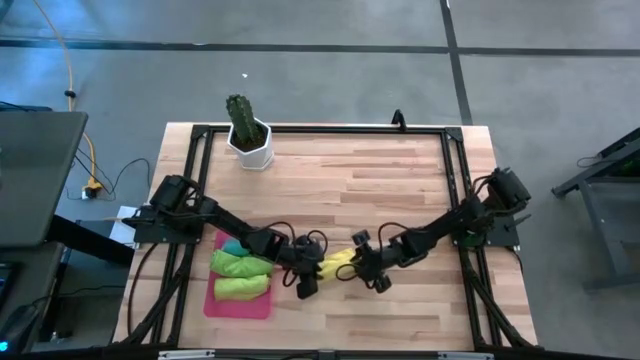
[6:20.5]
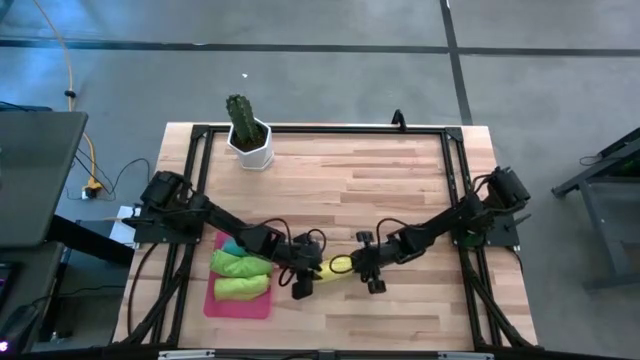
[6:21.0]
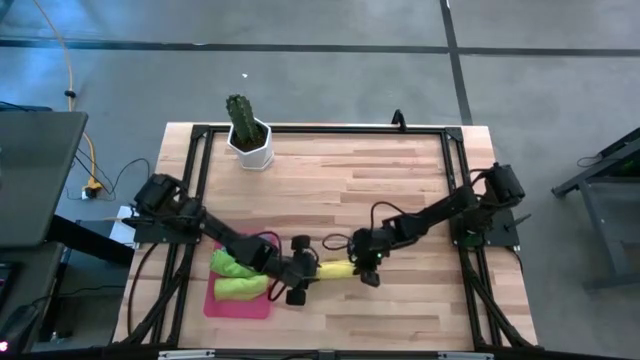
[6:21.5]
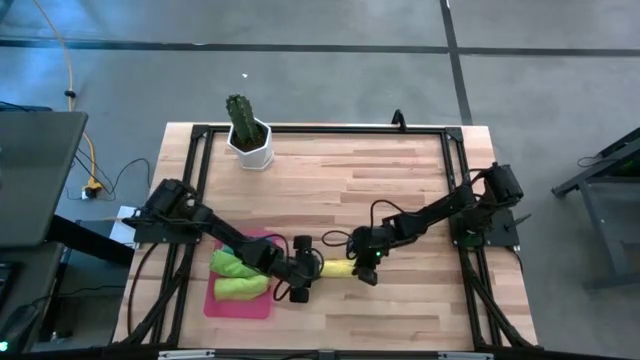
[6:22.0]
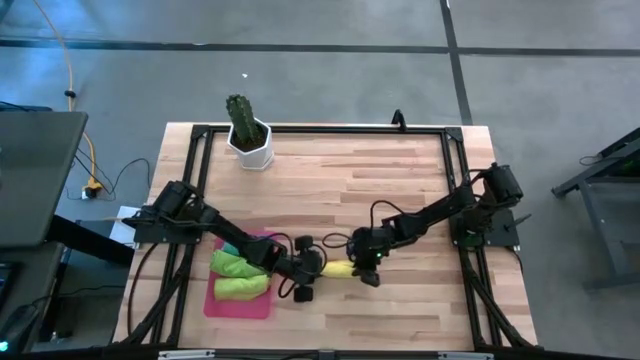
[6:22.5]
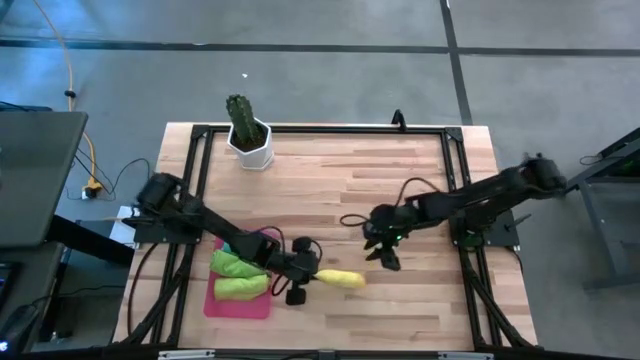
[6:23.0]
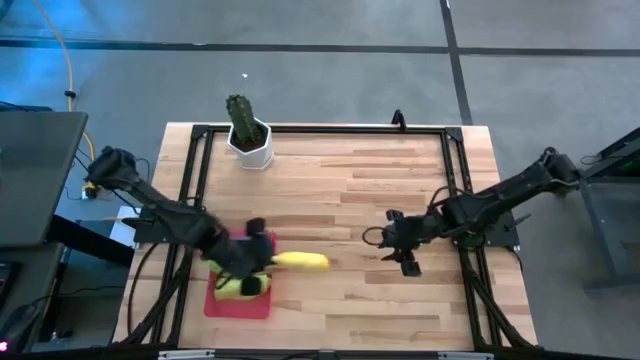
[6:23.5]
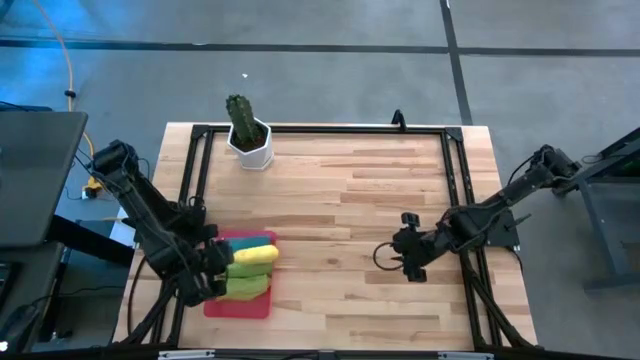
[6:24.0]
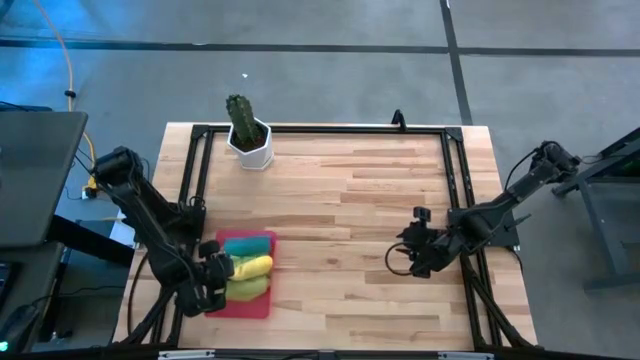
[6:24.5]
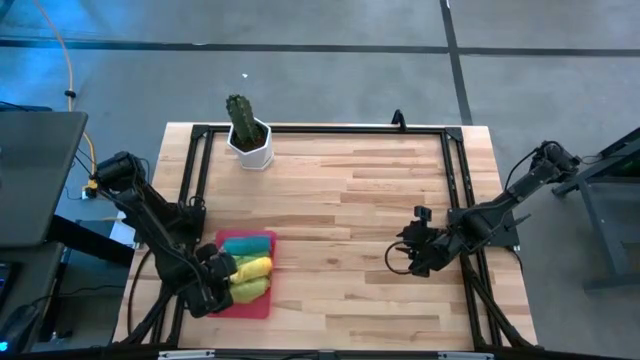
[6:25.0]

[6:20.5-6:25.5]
Task: Roll microfiber towels into tight, uniform cylinder then place into a basket
Put the rolled yellow towel into the red bin

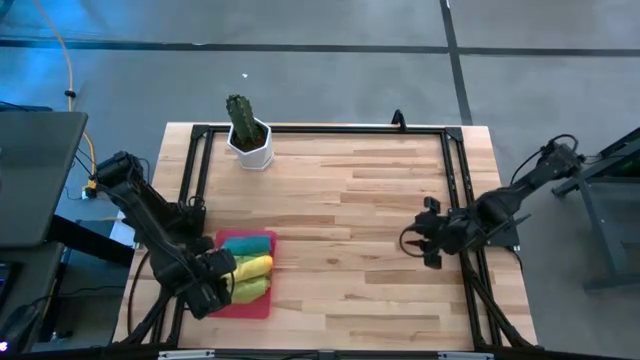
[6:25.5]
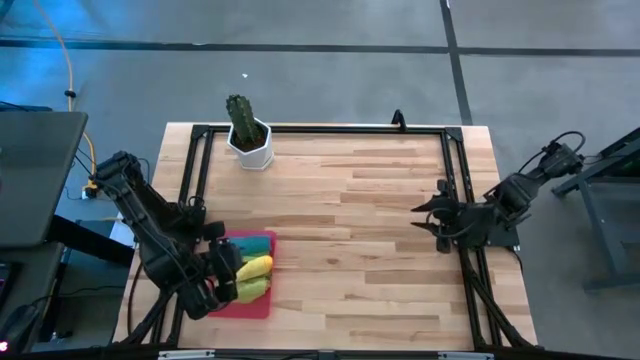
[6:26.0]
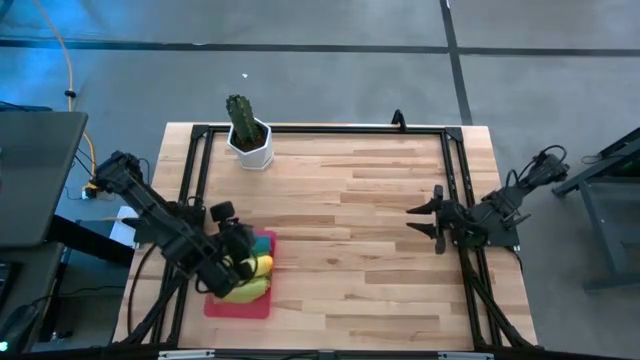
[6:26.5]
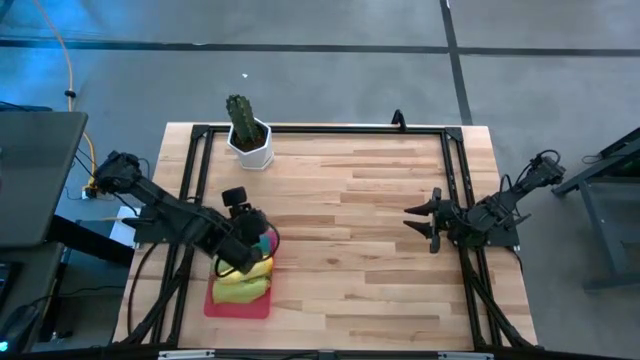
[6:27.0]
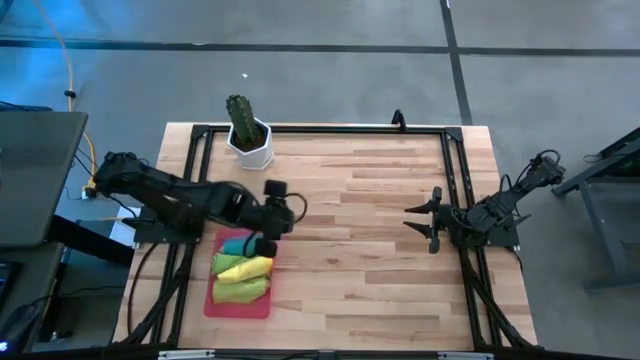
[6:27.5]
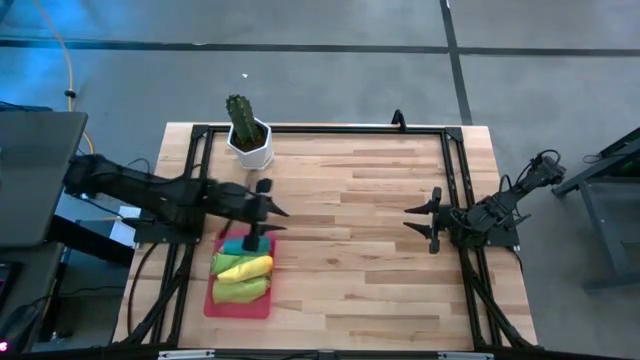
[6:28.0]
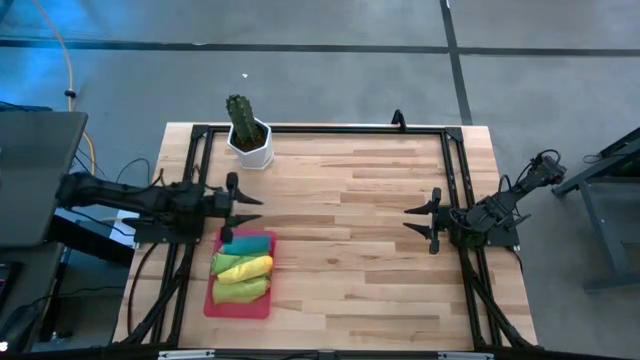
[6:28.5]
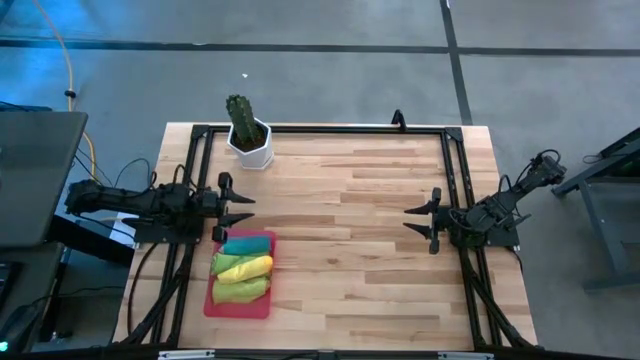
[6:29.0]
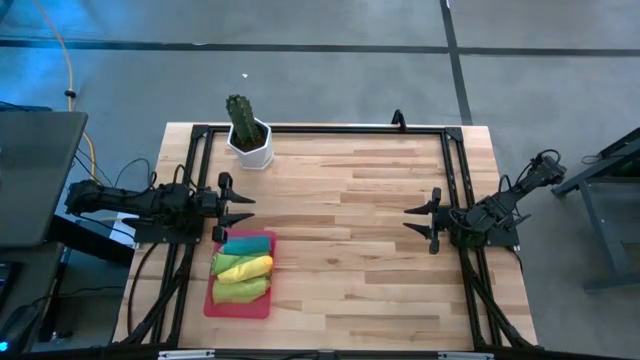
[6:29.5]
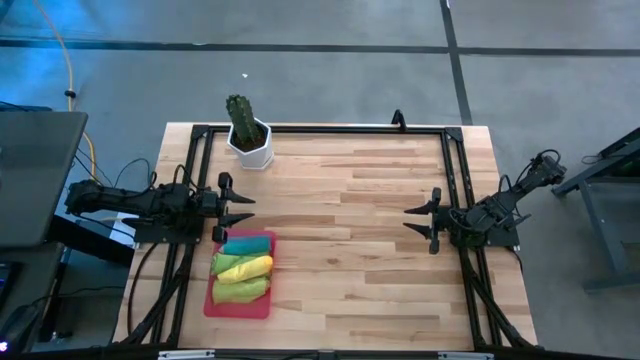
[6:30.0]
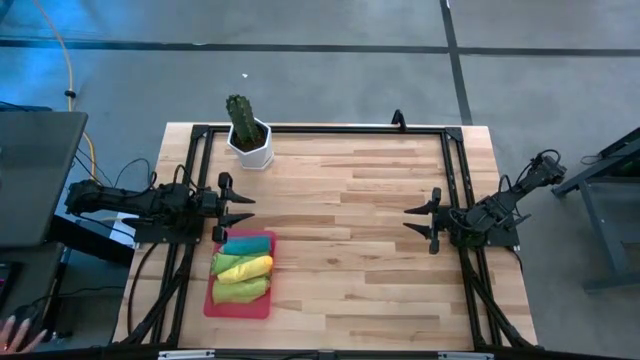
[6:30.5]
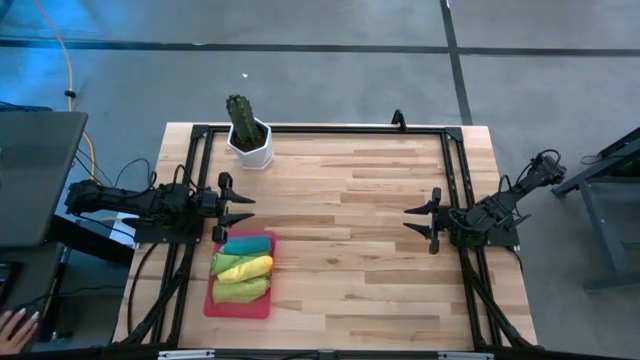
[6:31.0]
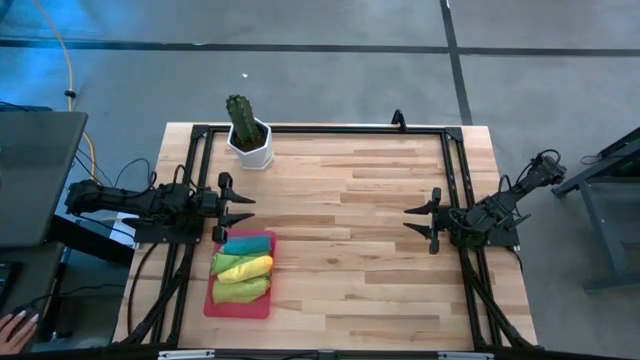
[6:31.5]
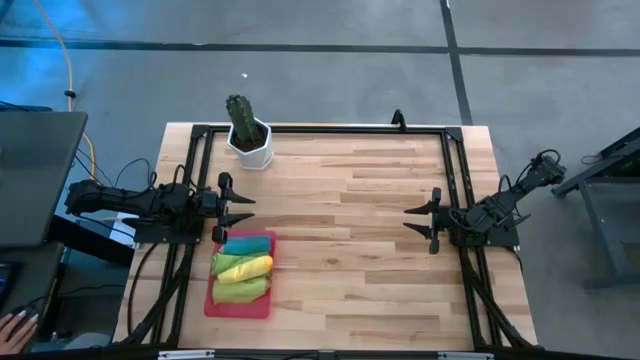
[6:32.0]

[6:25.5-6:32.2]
Return to Home Position
